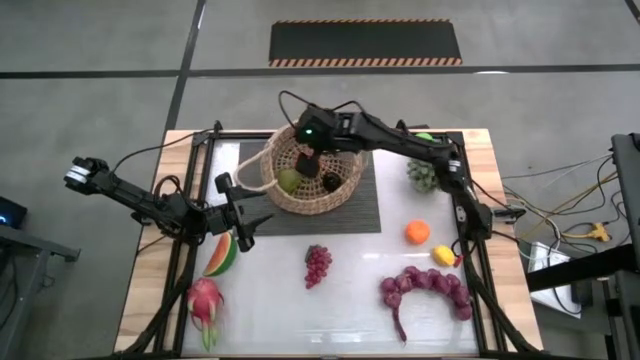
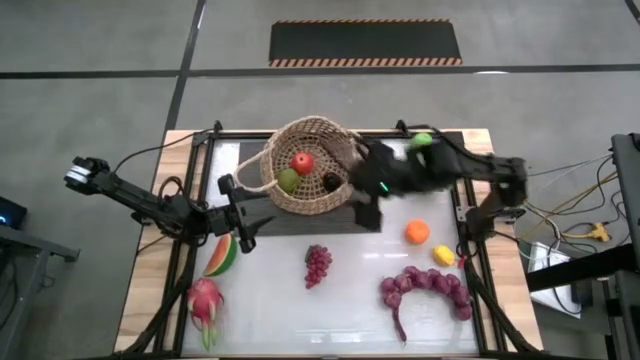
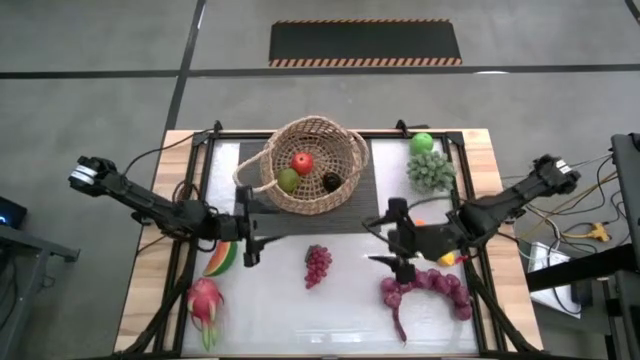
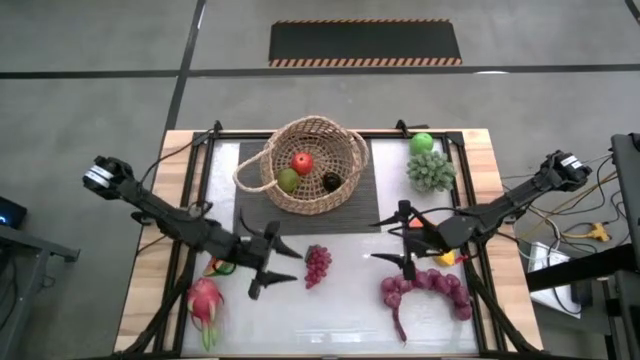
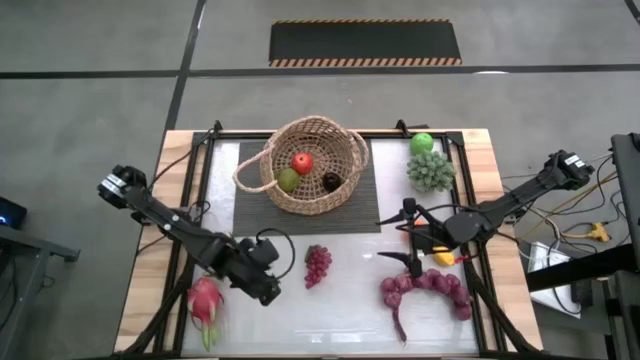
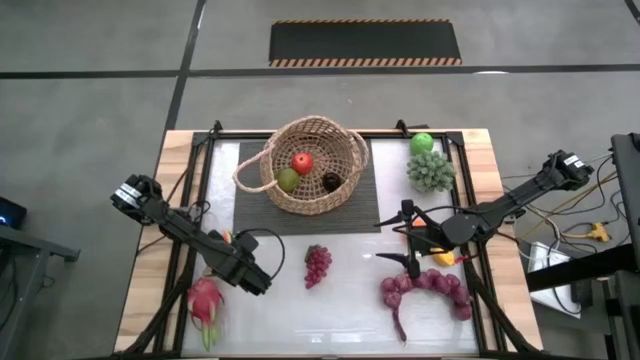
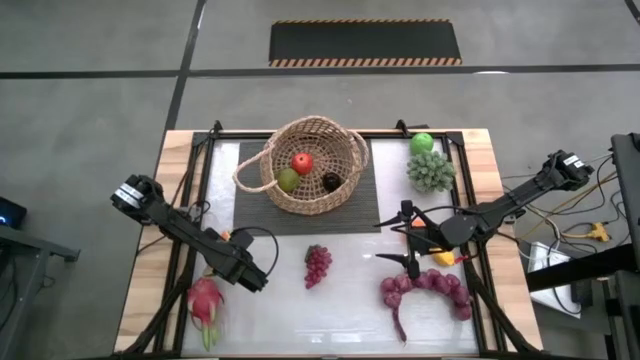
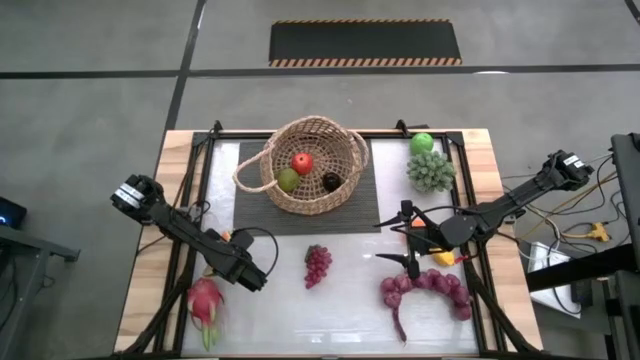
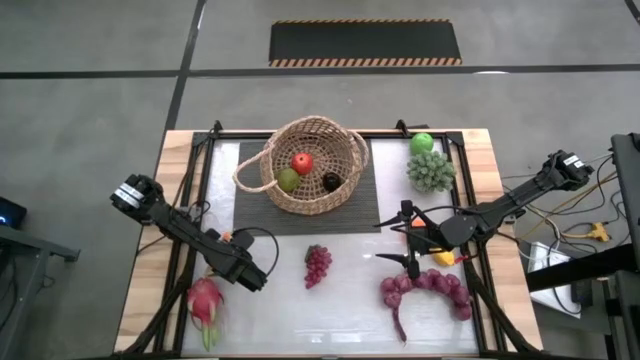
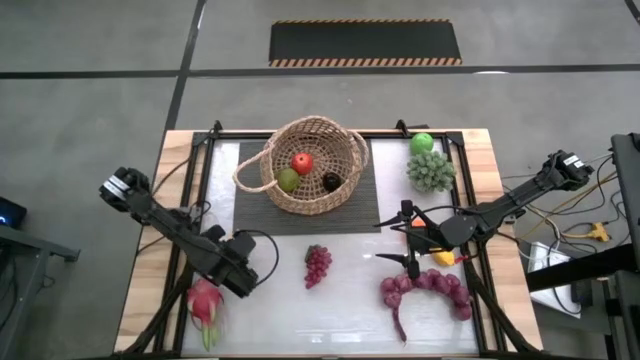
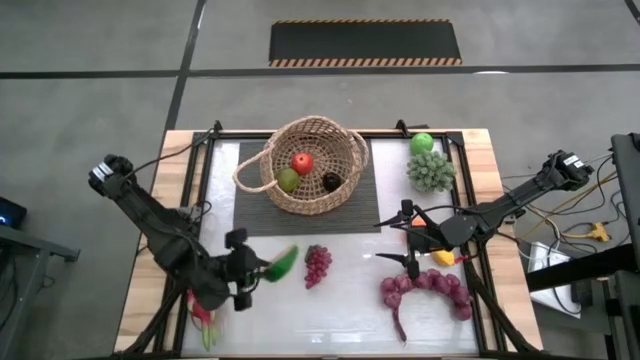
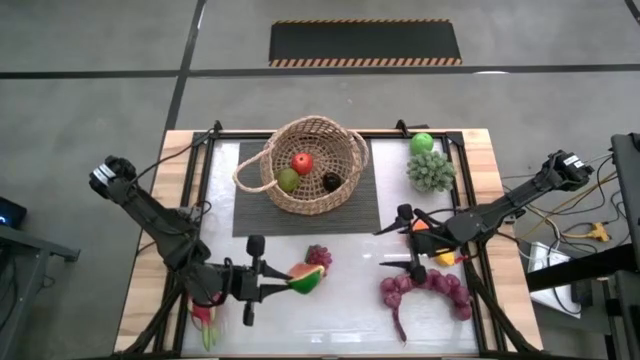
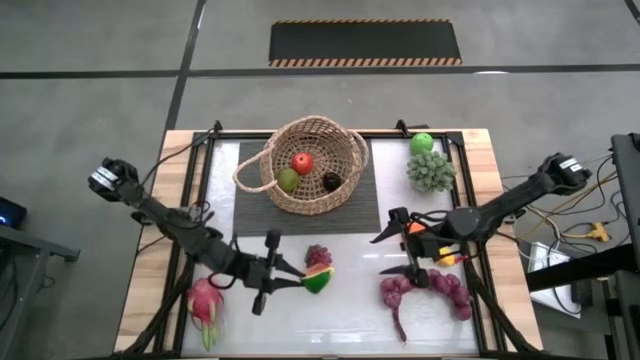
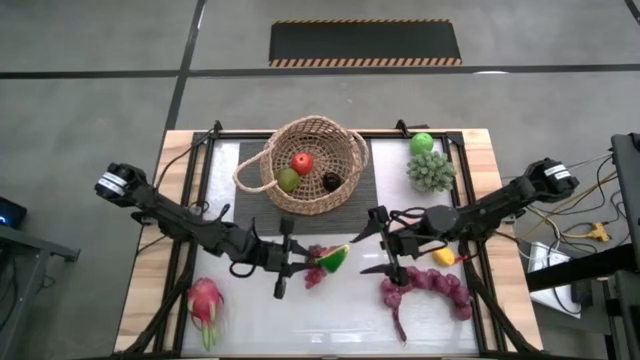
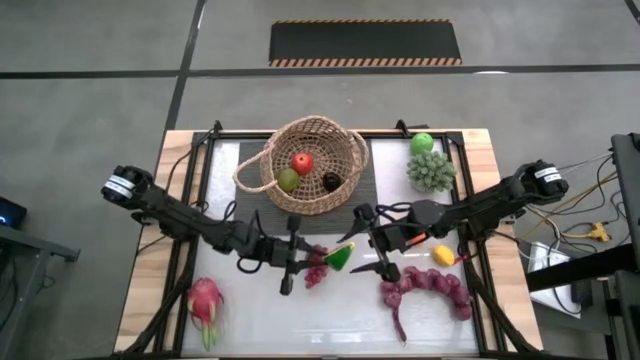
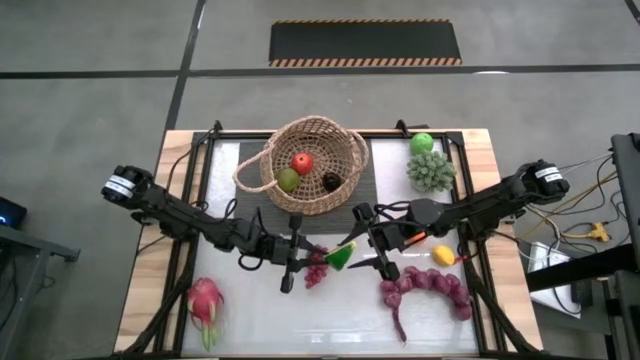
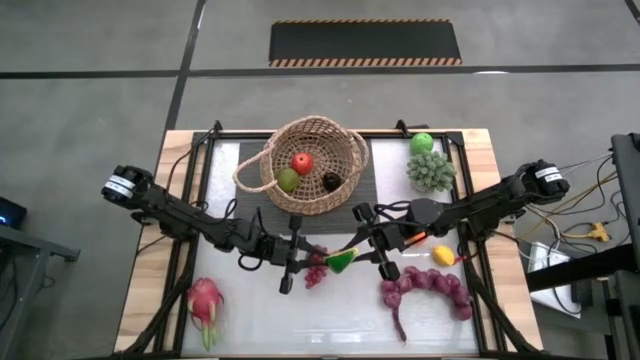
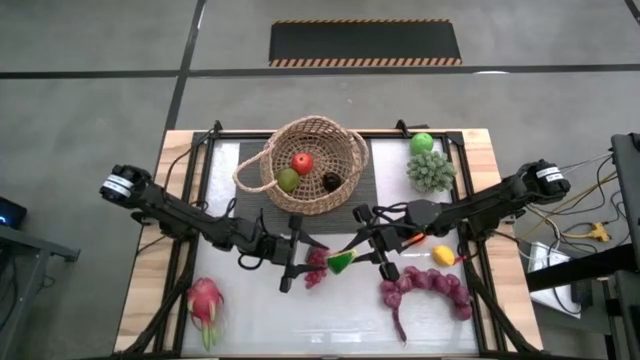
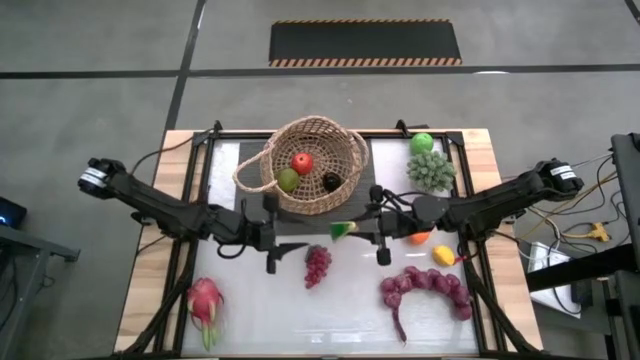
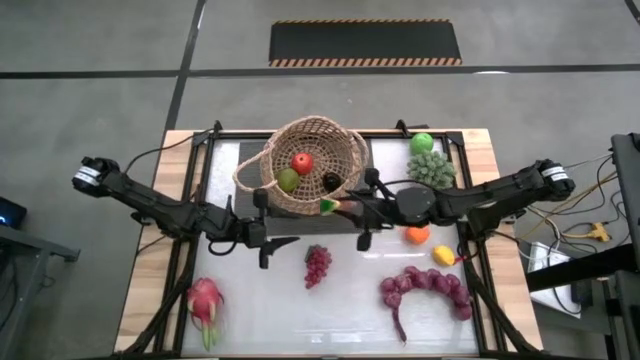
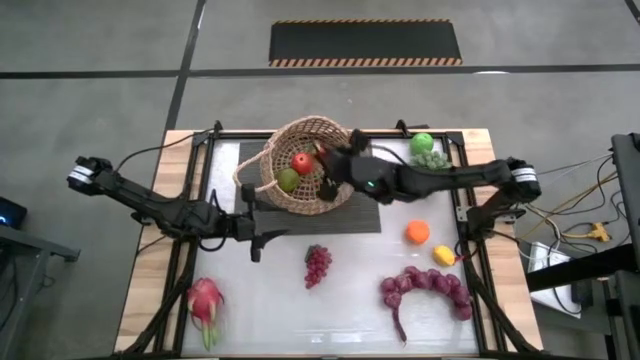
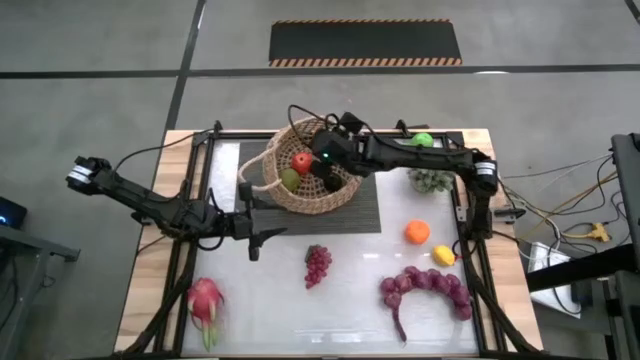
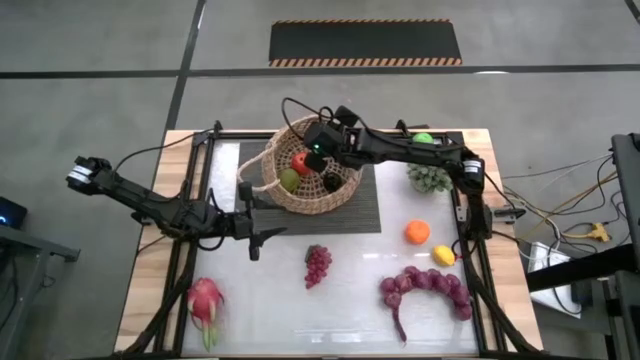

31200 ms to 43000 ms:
Task: Build produce basket
Put the watermelon into the basket

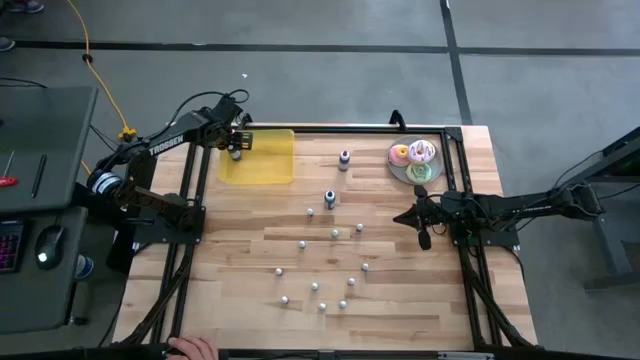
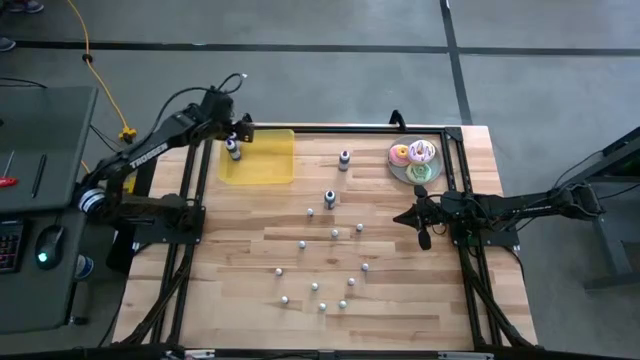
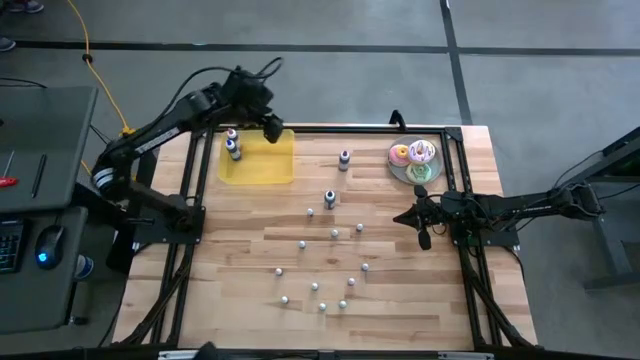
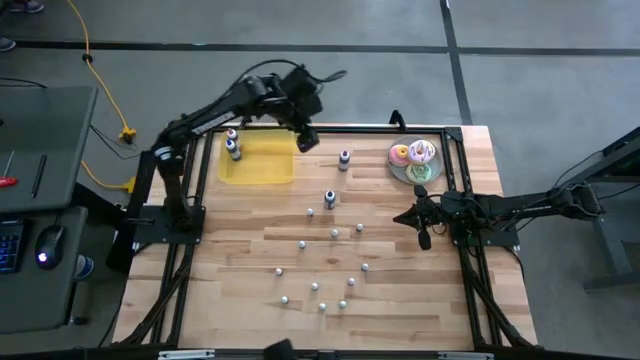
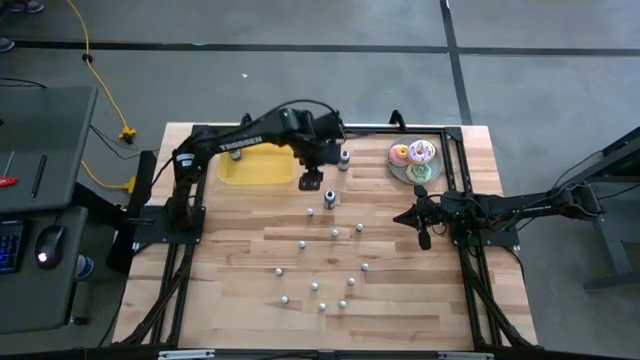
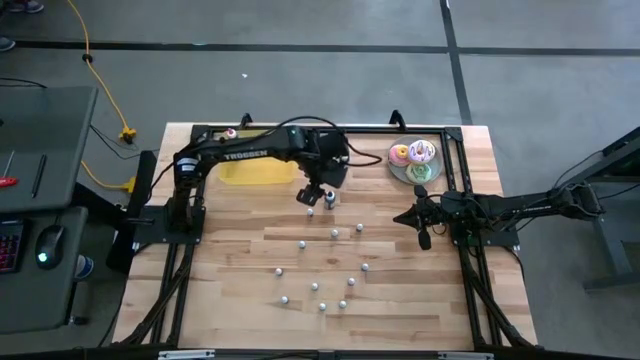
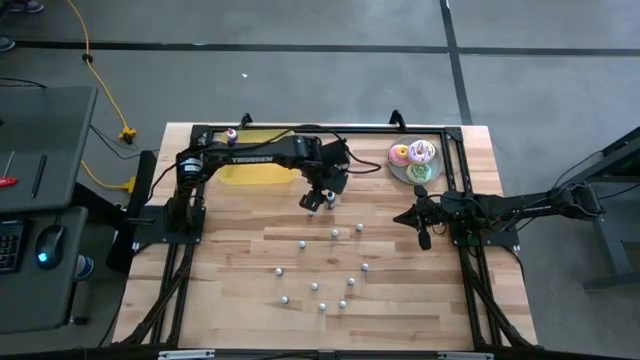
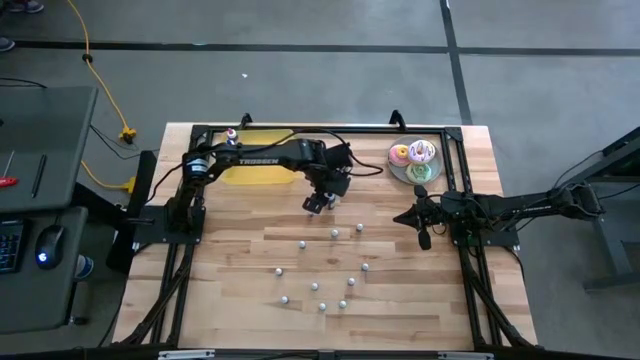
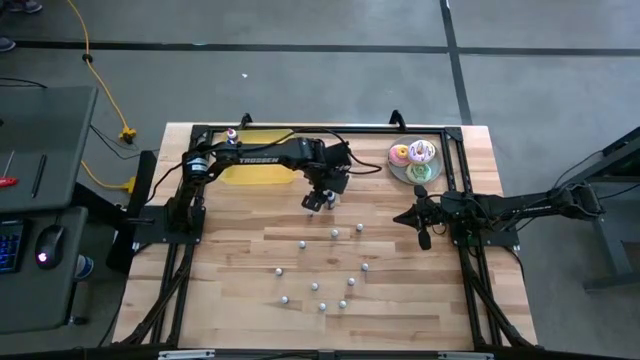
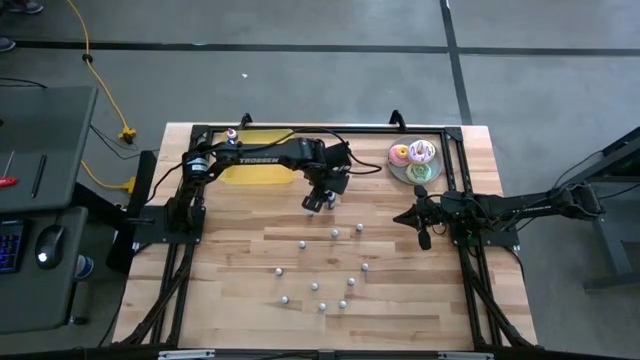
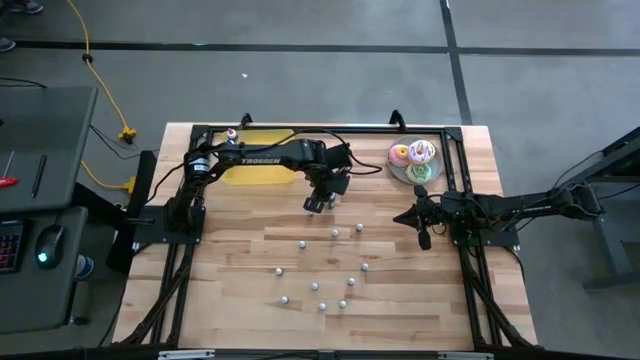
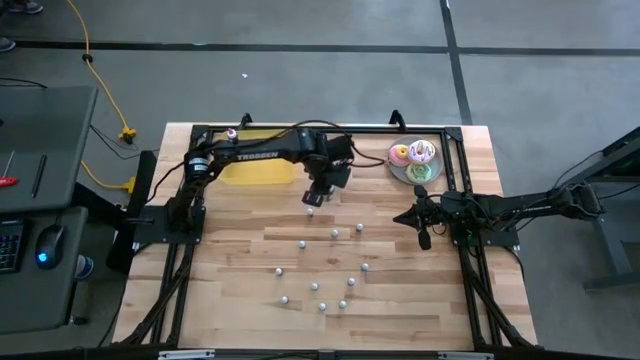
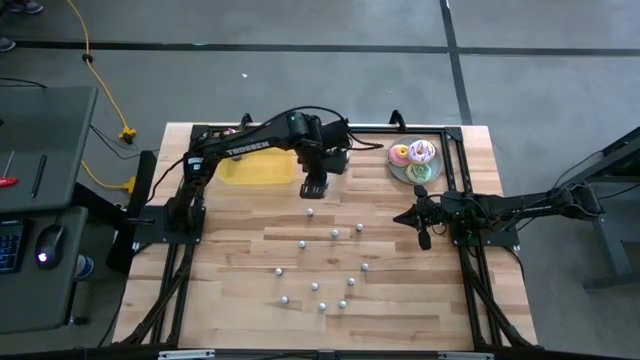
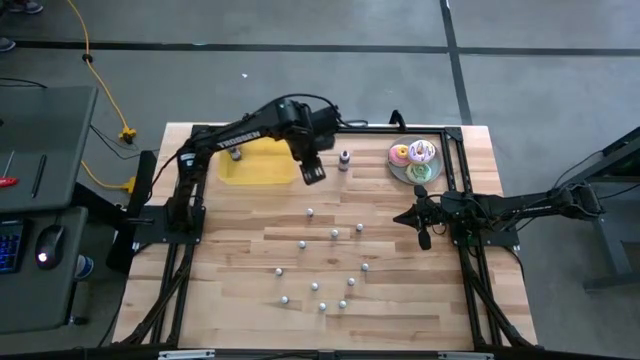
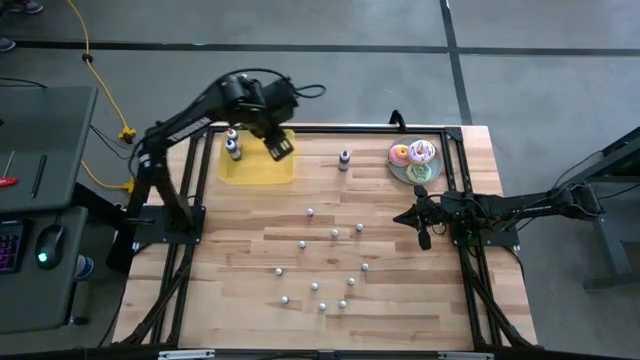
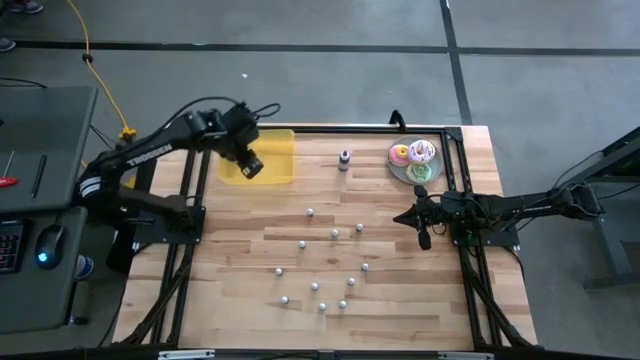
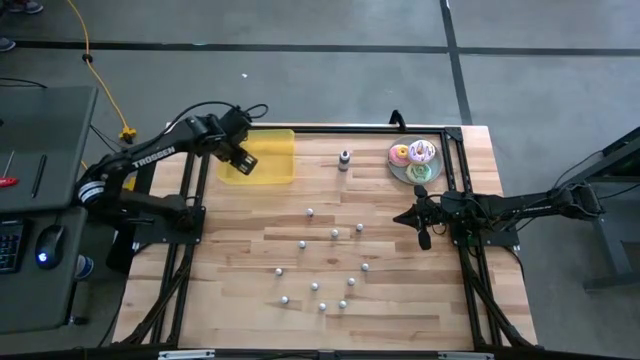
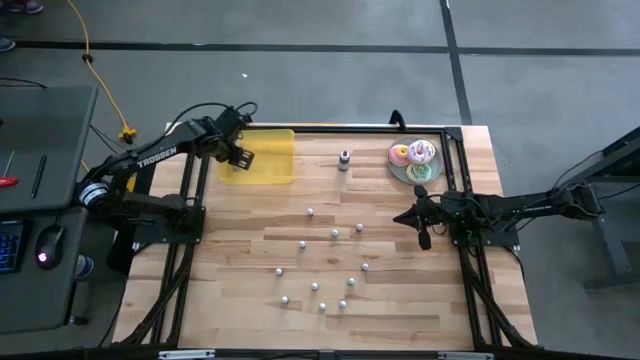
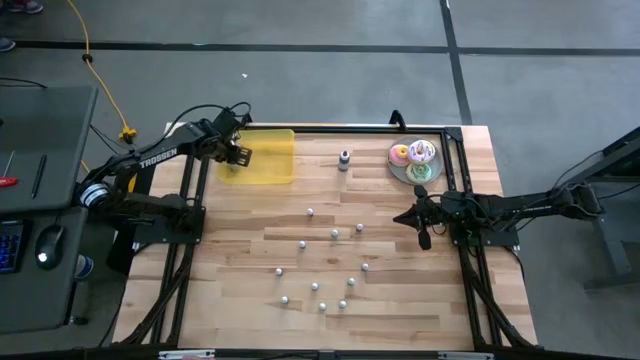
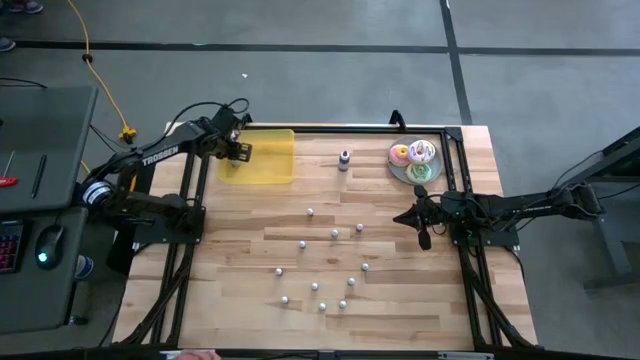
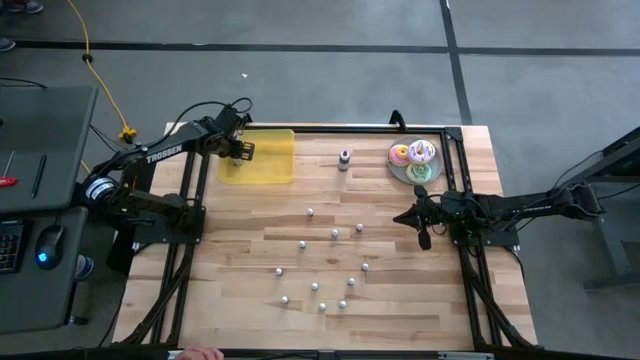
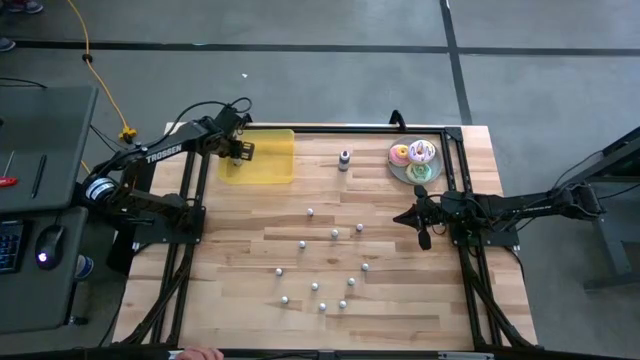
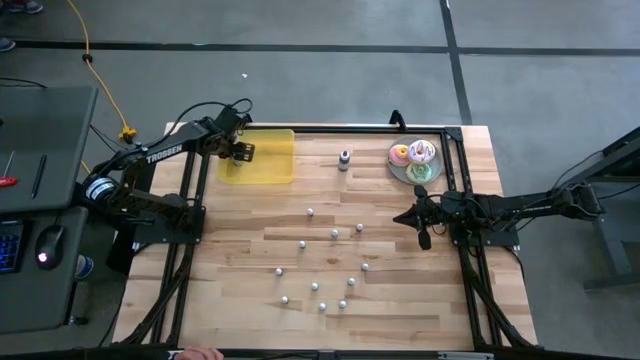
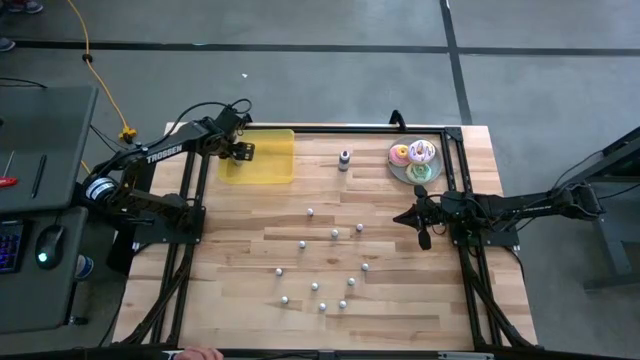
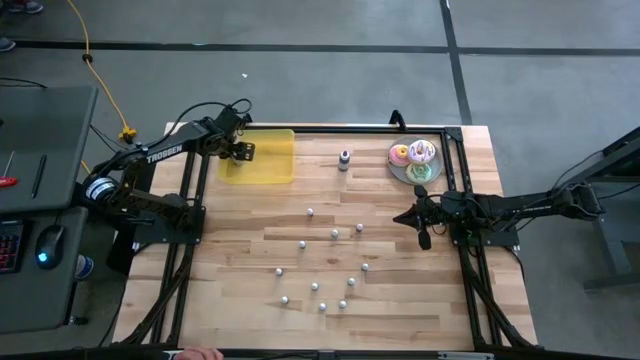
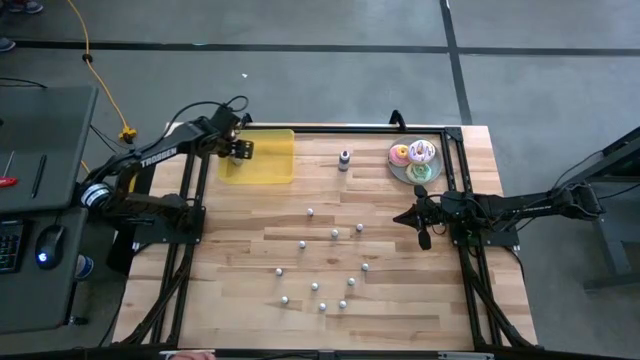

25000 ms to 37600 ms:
Task: Pick & Place food coloring
Put the large black food coloring bottle into the yellow bin
